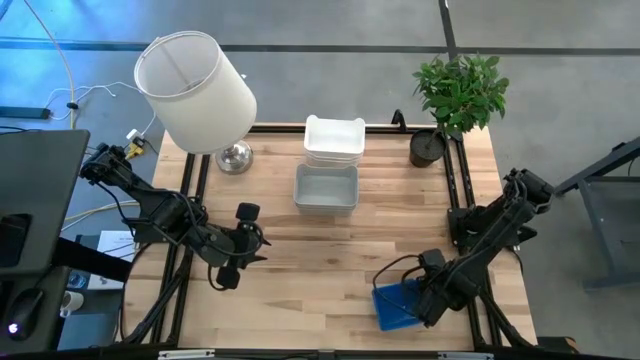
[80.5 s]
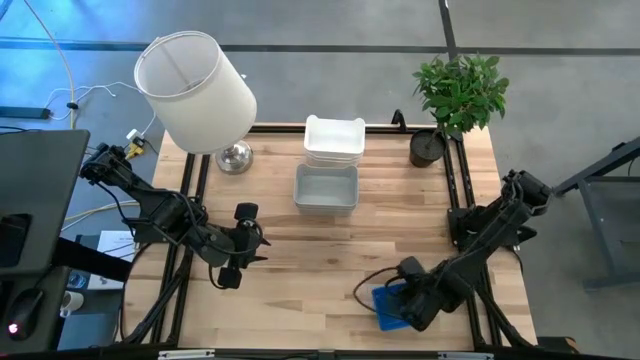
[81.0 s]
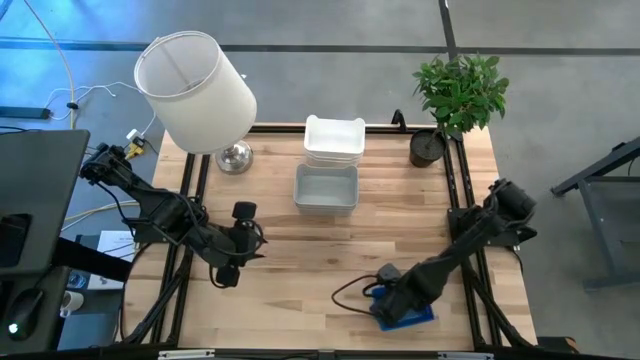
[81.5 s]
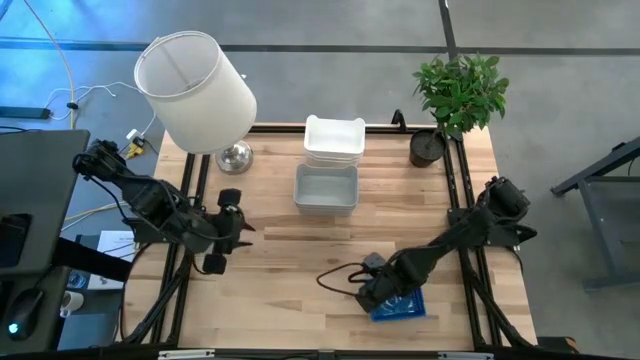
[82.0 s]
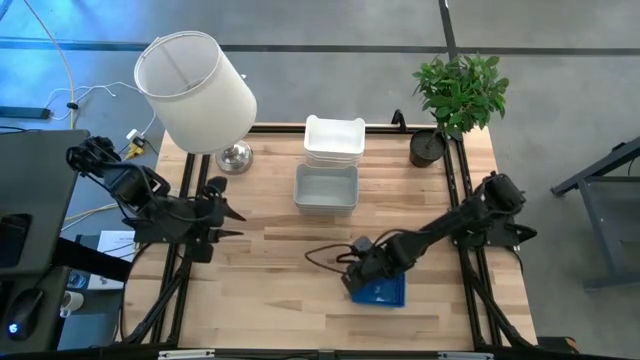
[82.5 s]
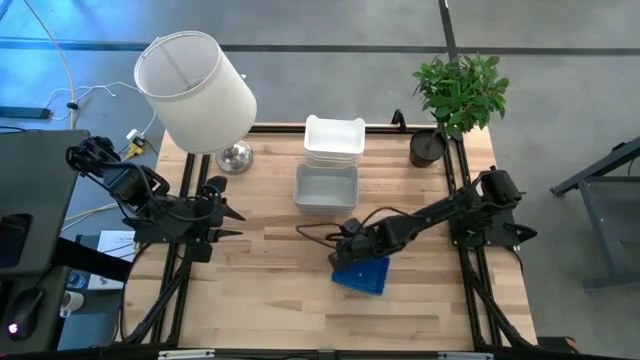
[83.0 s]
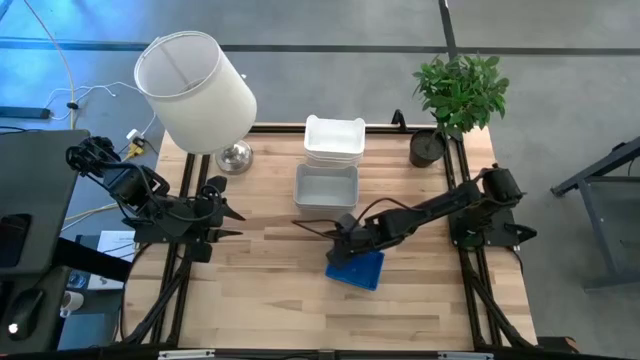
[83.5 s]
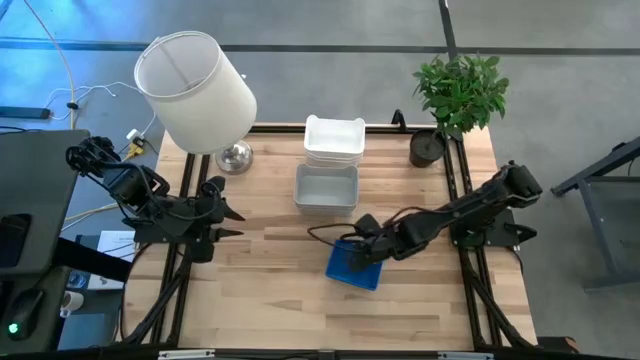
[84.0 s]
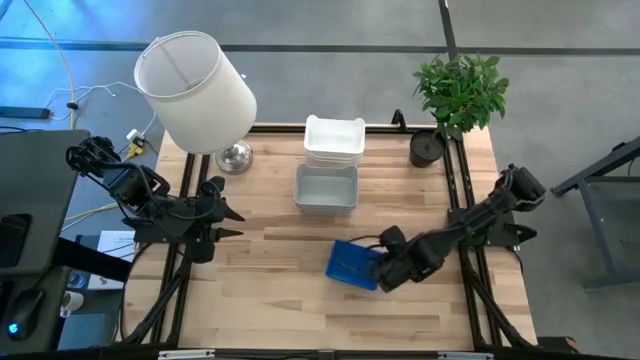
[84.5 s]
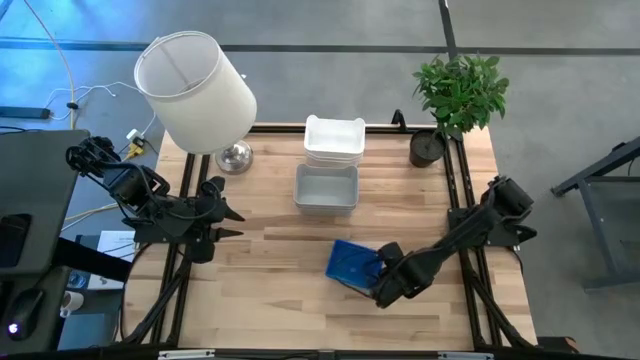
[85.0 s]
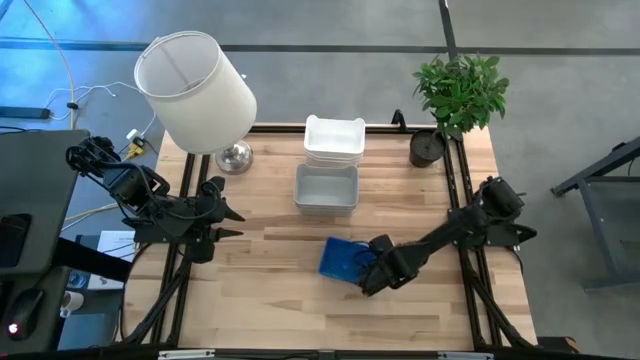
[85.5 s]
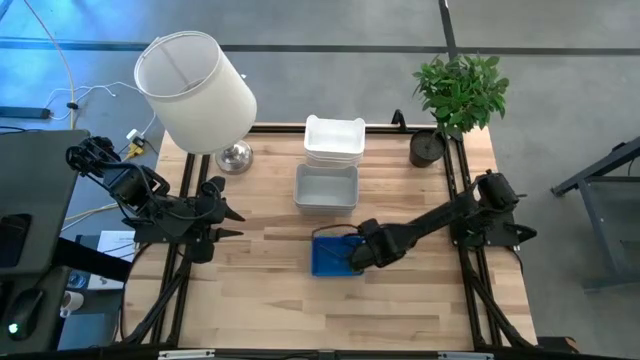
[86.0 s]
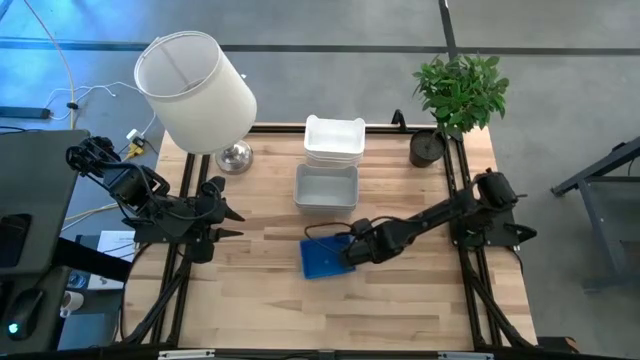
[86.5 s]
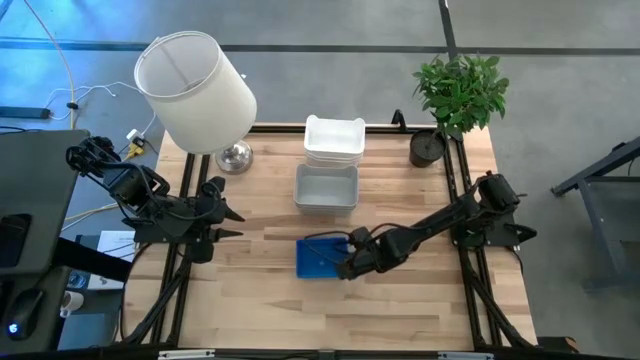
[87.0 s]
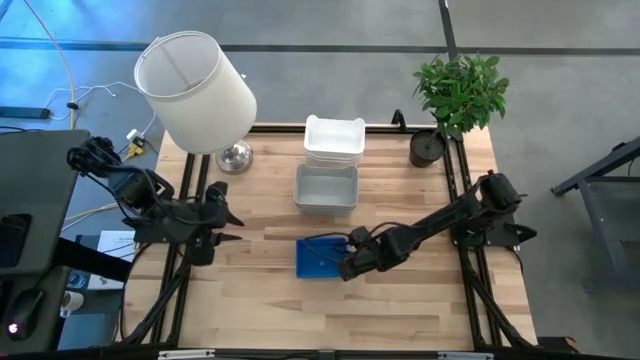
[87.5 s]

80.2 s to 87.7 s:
Move the stacked blue bins to the center of the table

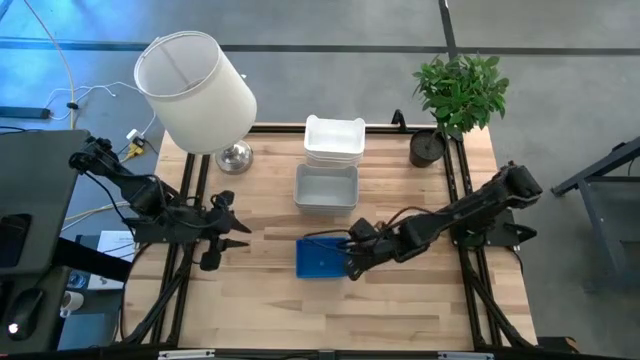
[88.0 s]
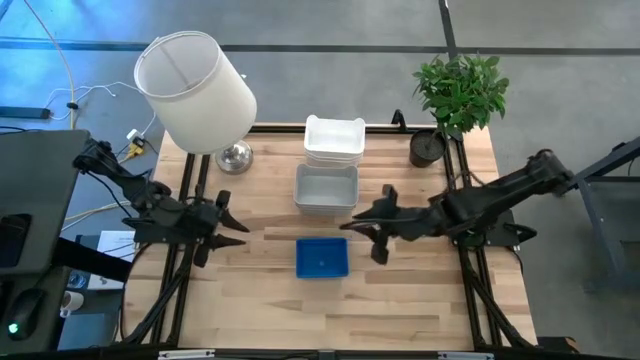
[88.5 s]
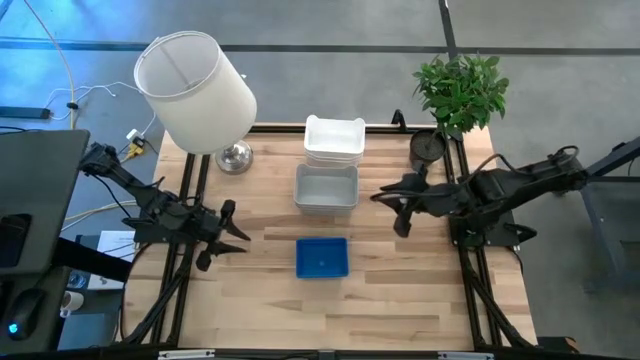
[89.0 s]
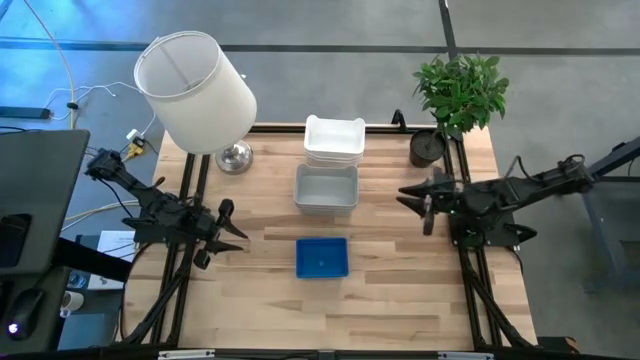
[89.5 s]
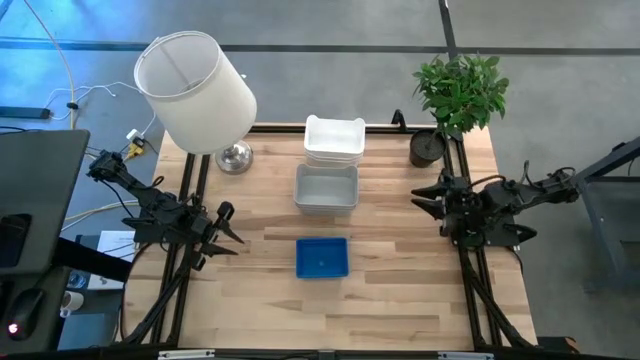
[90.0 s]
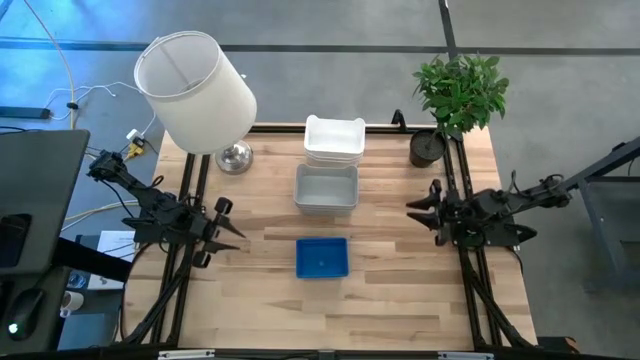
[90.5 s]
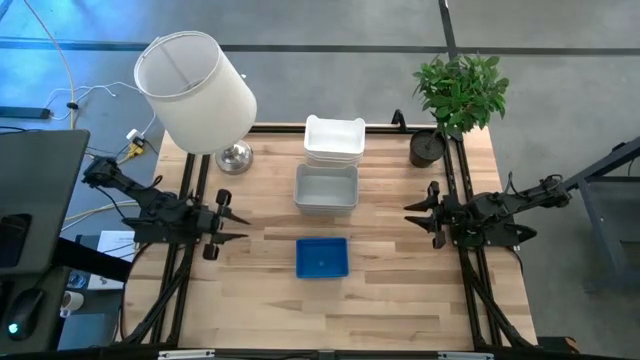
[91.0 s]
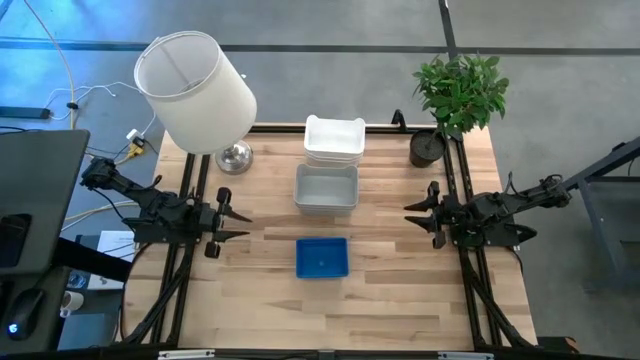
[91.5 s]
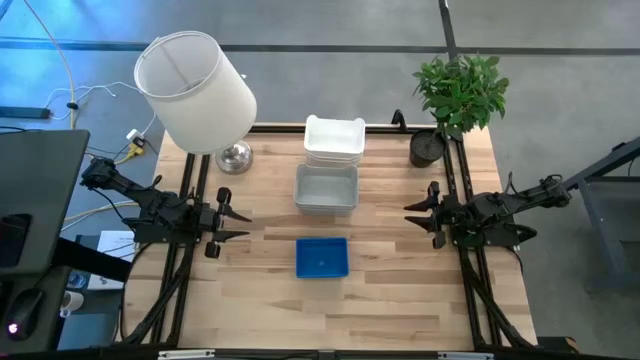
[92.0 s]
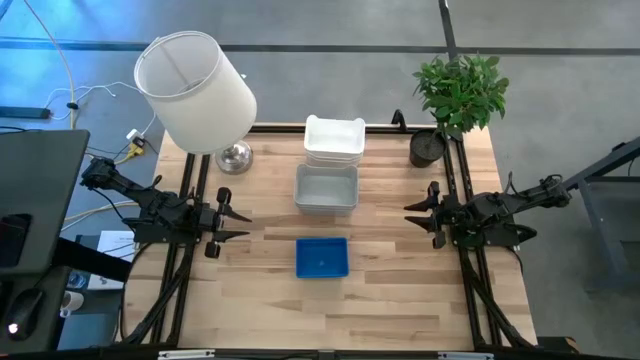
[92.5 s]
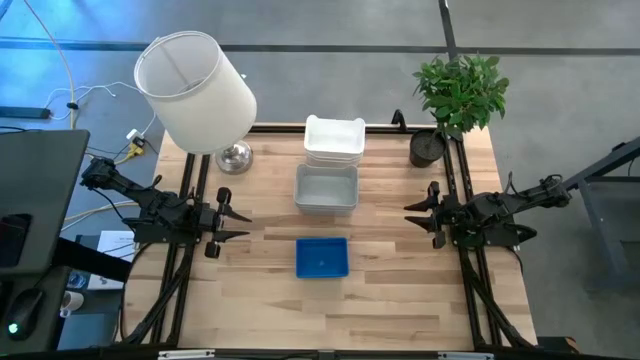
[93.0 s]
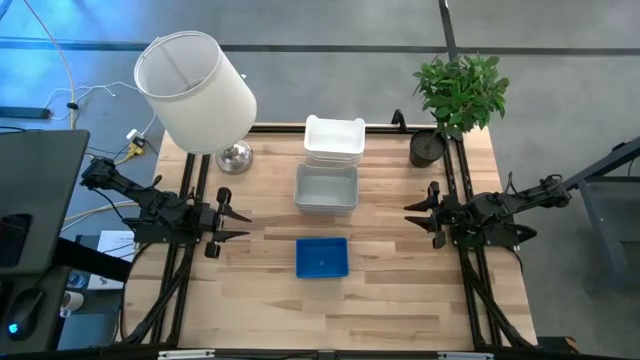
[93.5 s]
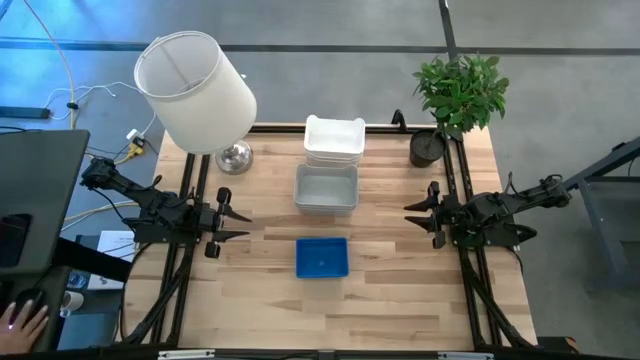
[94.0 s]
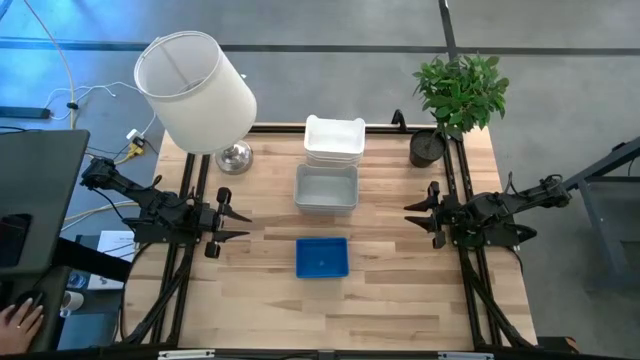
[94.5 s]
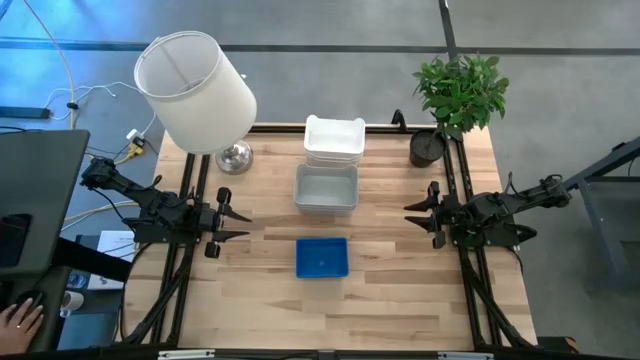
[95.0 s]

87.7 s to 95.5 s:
Return to Home Position

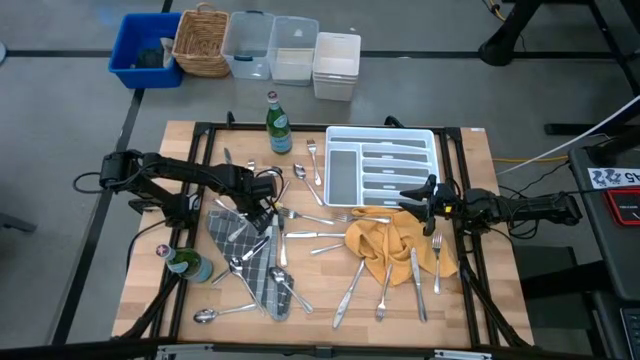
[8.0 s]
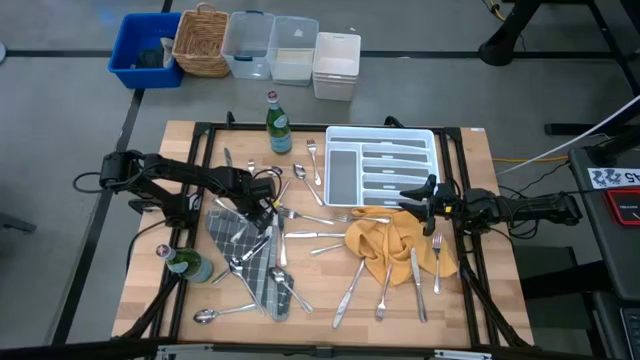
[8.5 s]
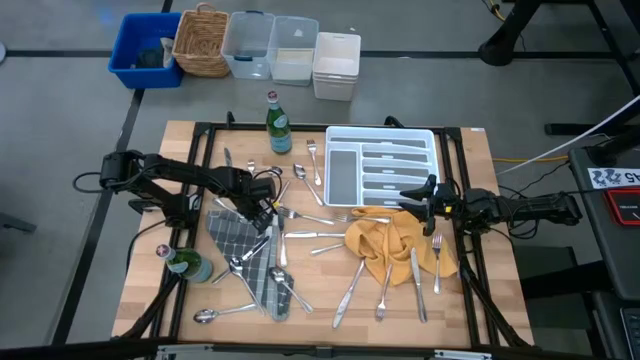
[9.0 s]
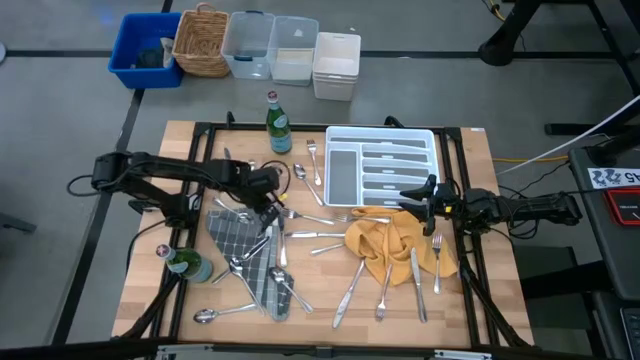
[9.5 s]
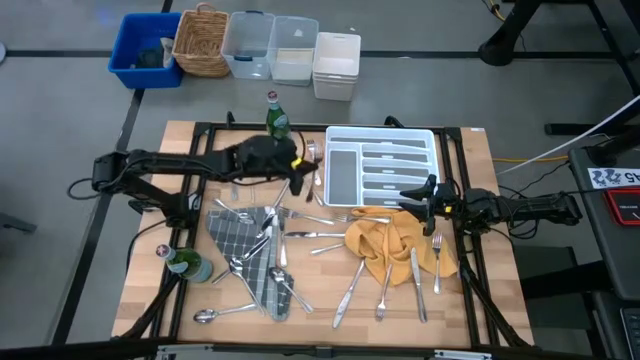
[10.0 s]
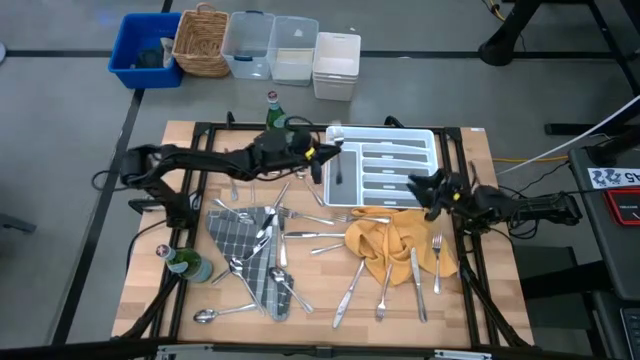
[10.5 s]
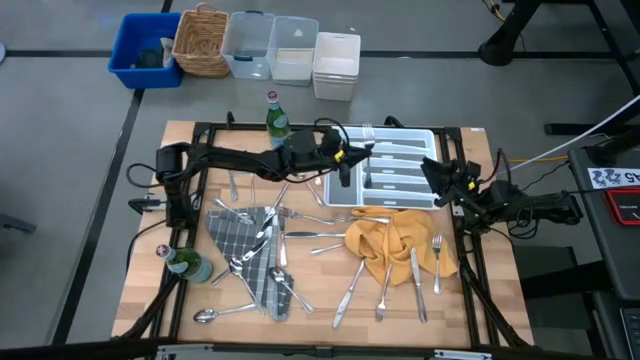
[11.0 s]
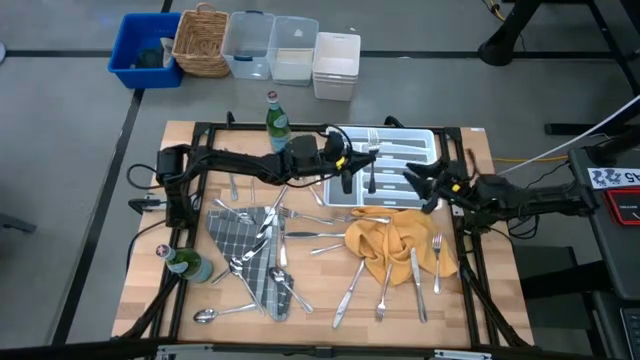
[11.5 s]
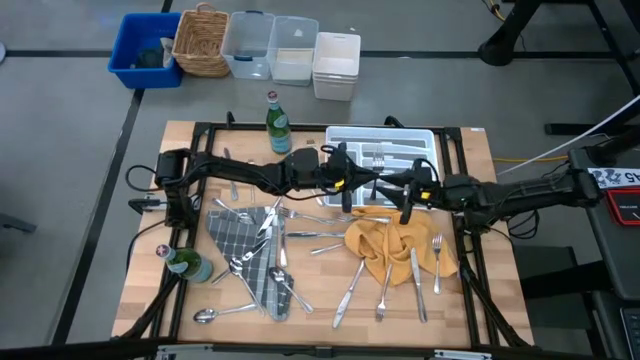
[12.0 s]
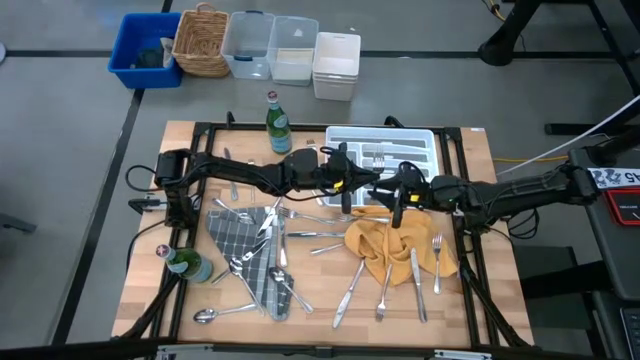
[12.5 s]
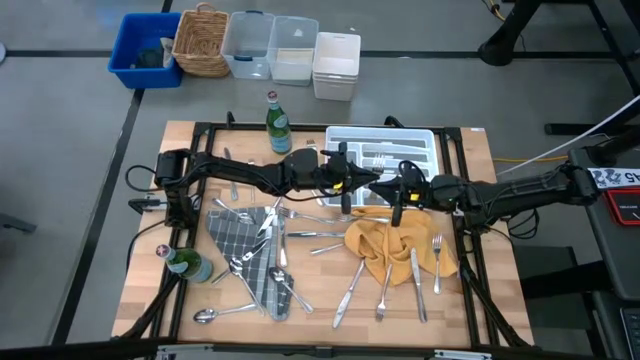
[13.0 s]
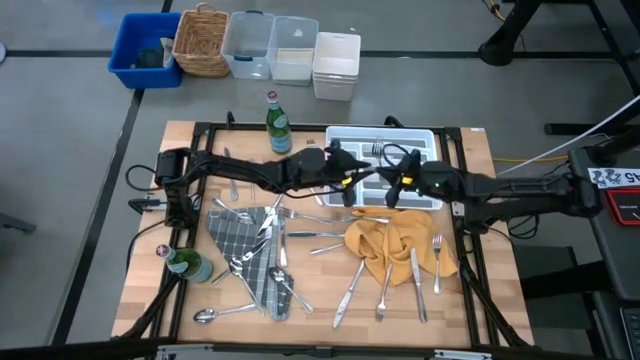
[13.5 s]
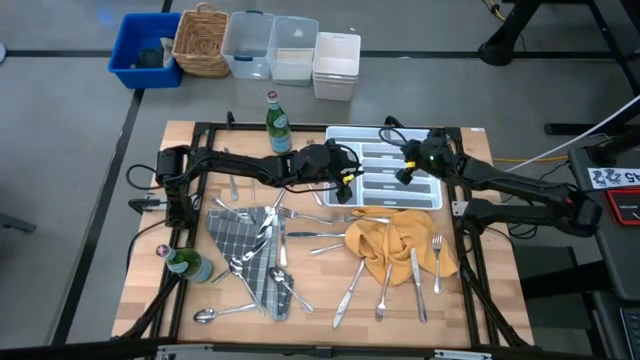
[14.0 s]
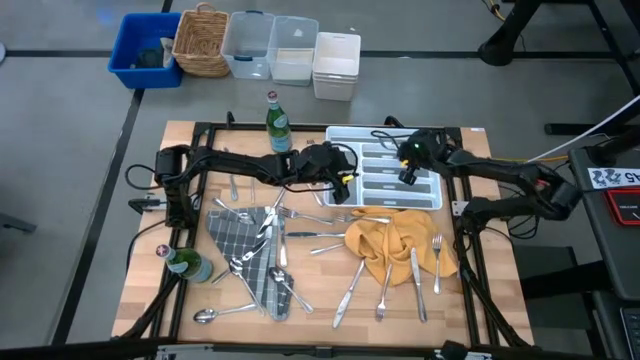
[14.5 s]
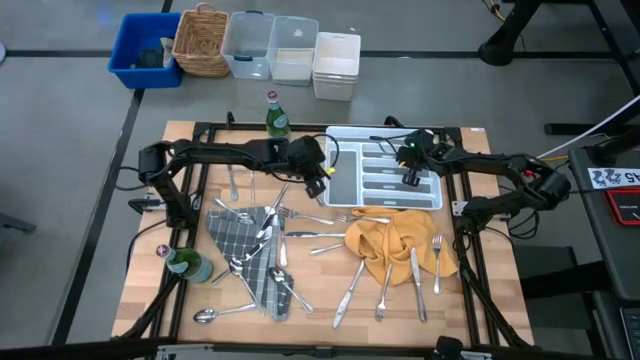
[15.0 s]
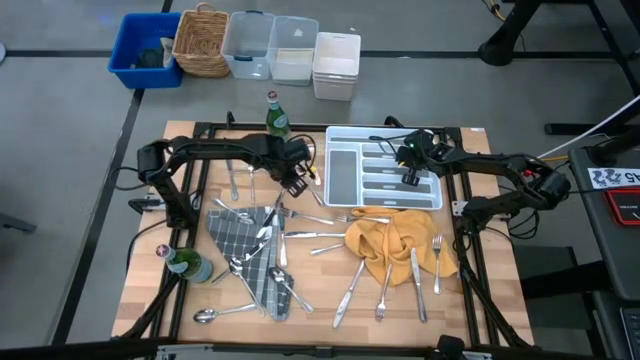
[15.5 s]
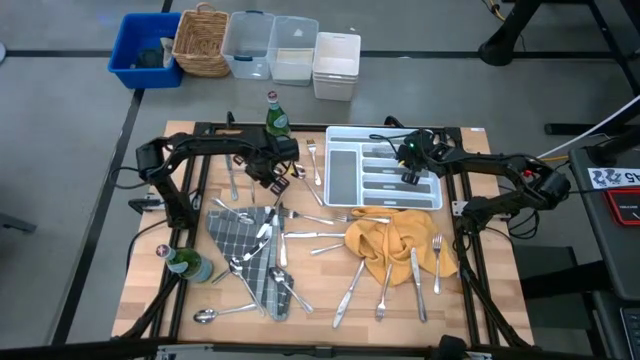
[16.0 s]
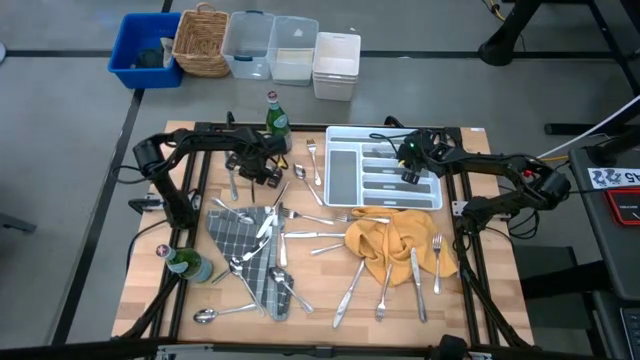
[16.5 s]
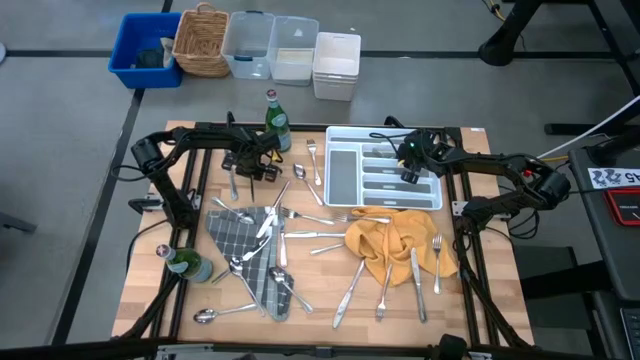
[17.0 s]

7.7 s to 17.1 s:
Put the silver fork into the cutlery tray
